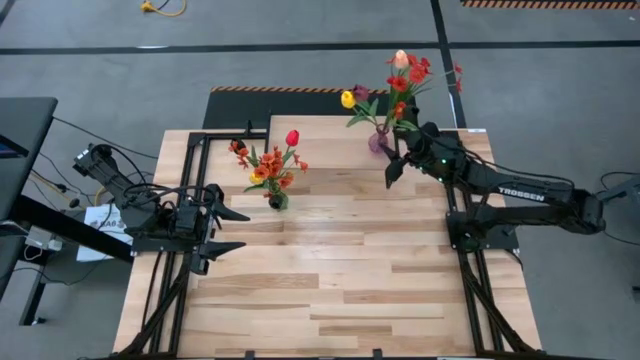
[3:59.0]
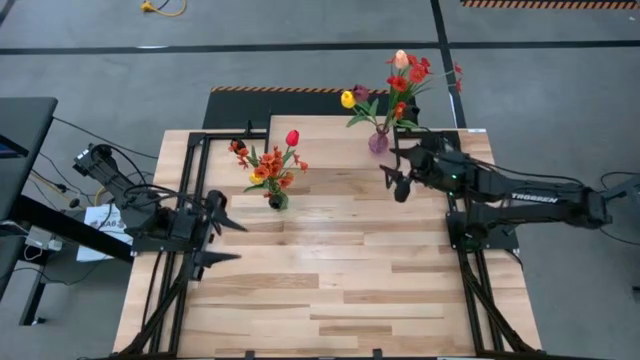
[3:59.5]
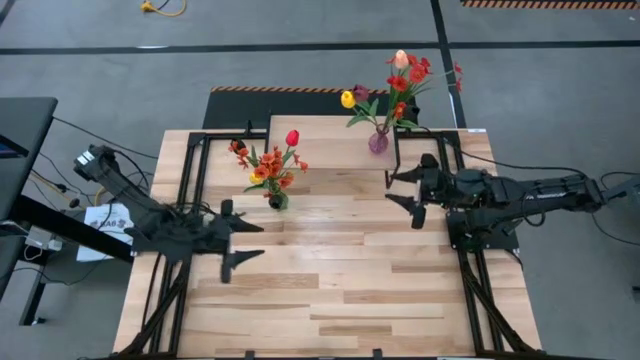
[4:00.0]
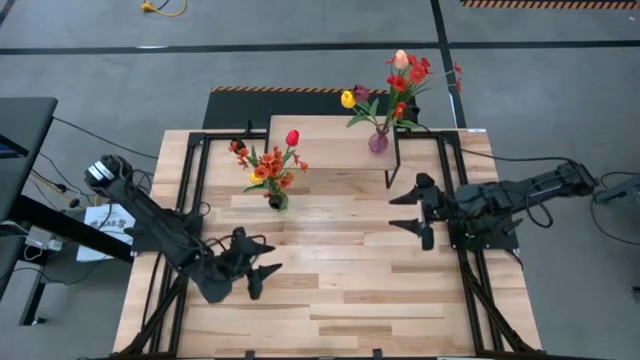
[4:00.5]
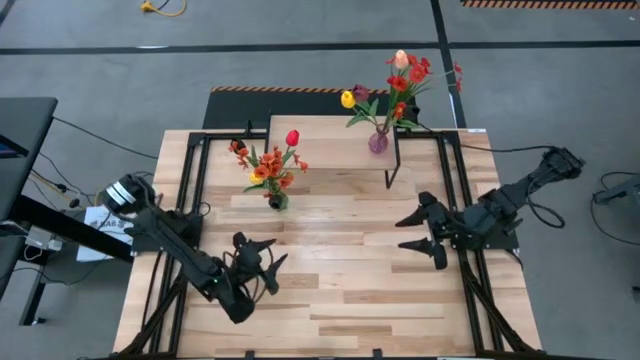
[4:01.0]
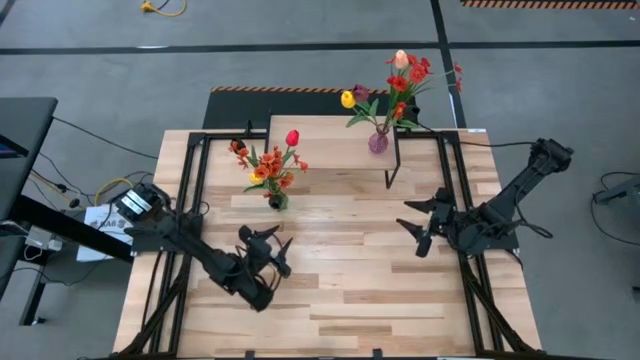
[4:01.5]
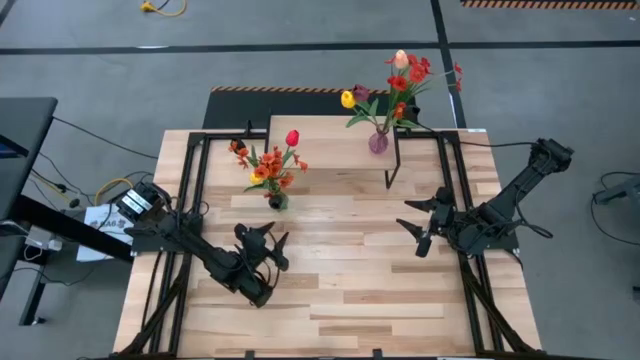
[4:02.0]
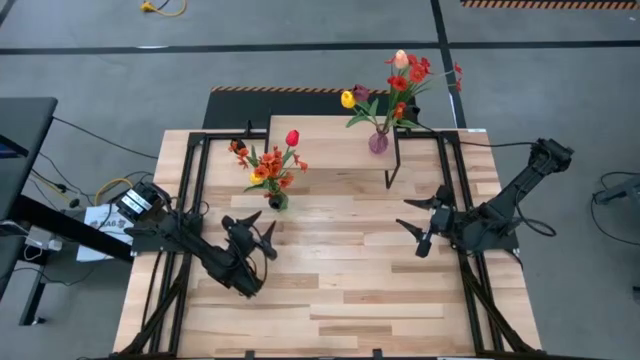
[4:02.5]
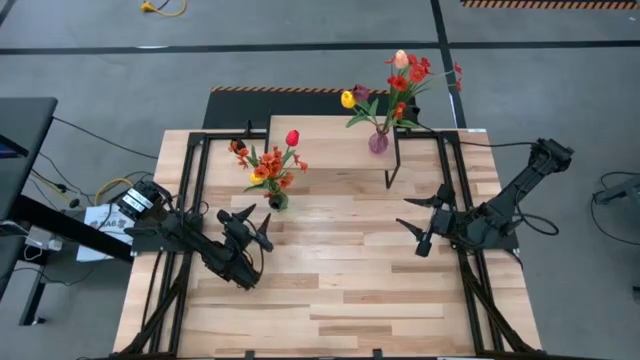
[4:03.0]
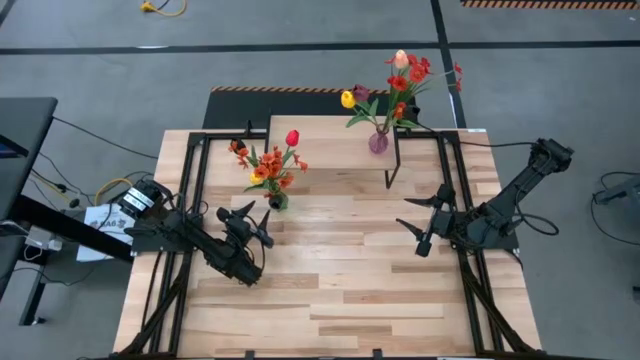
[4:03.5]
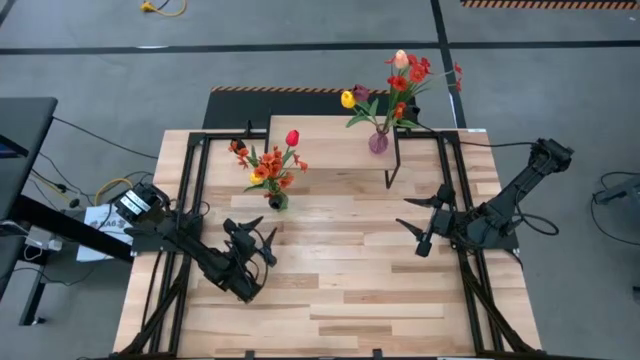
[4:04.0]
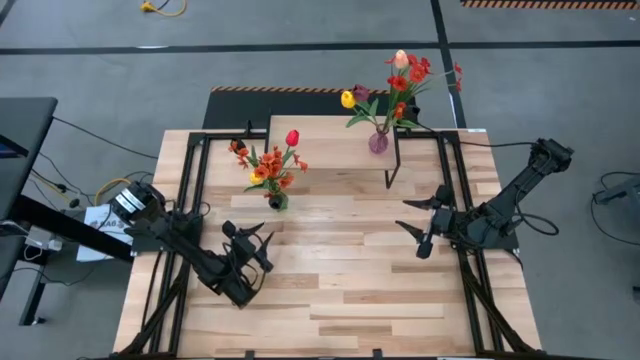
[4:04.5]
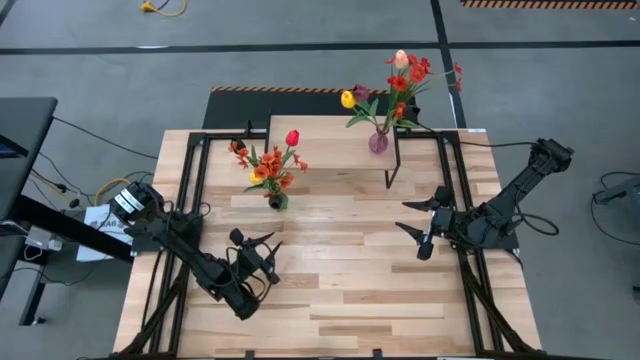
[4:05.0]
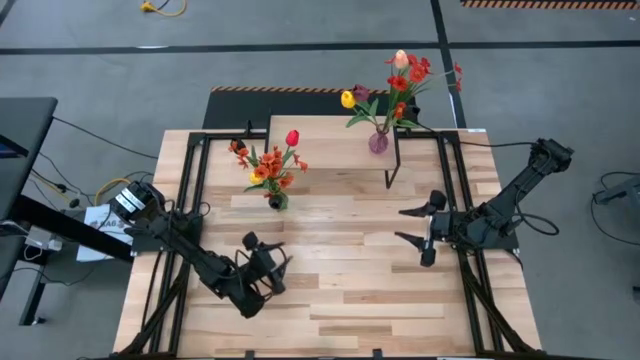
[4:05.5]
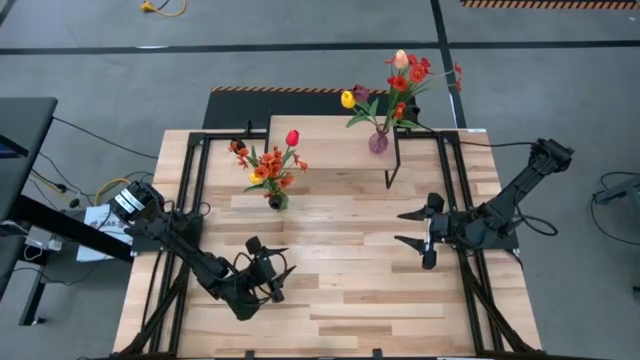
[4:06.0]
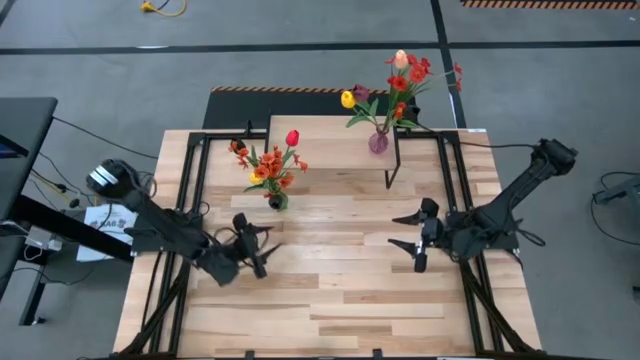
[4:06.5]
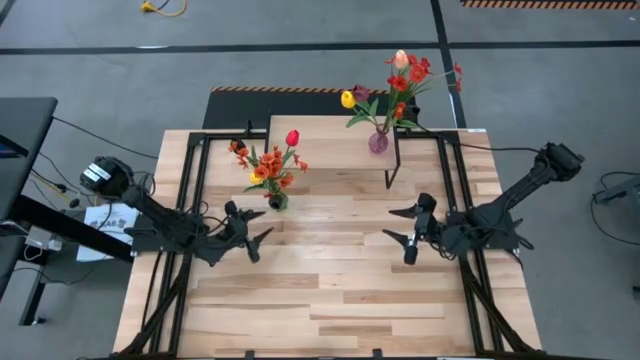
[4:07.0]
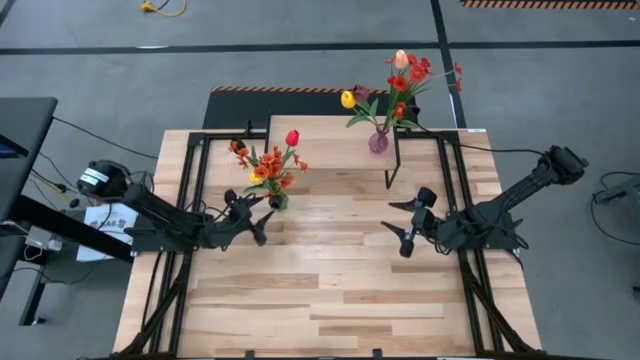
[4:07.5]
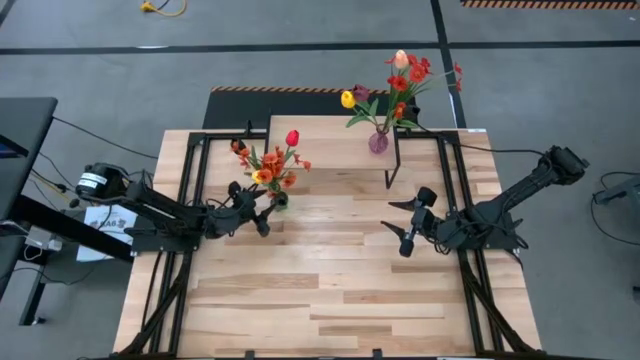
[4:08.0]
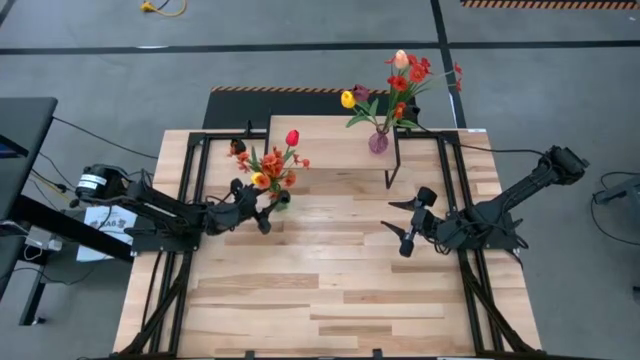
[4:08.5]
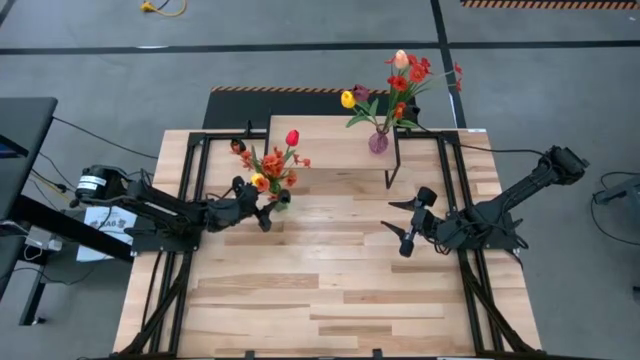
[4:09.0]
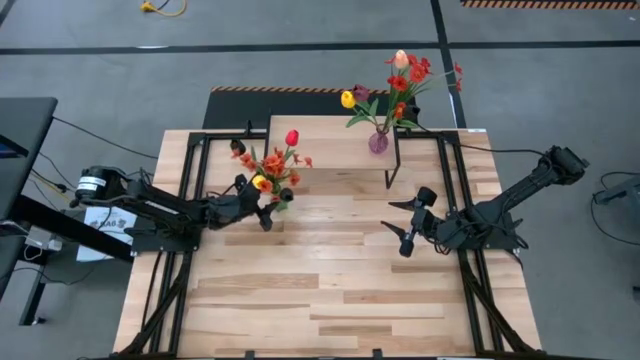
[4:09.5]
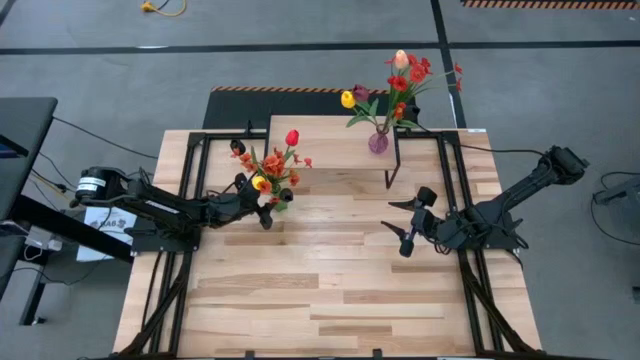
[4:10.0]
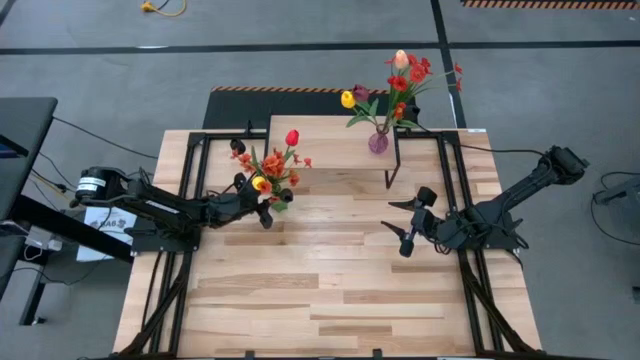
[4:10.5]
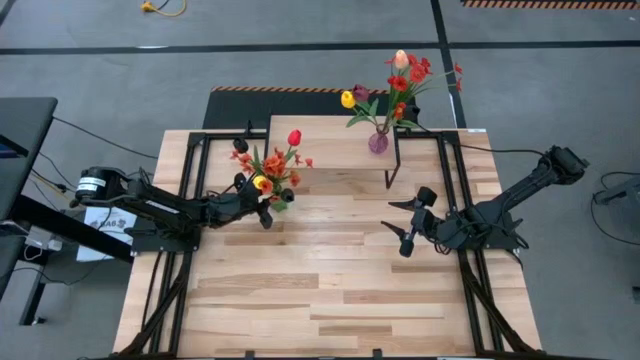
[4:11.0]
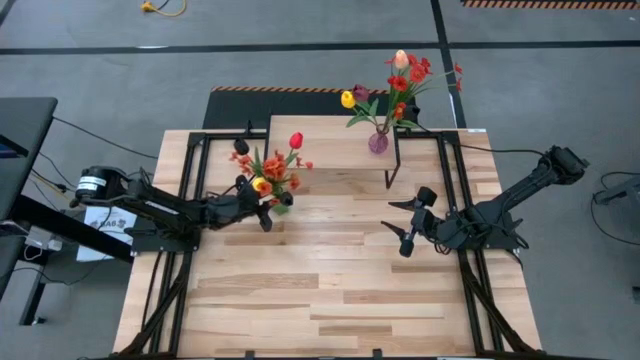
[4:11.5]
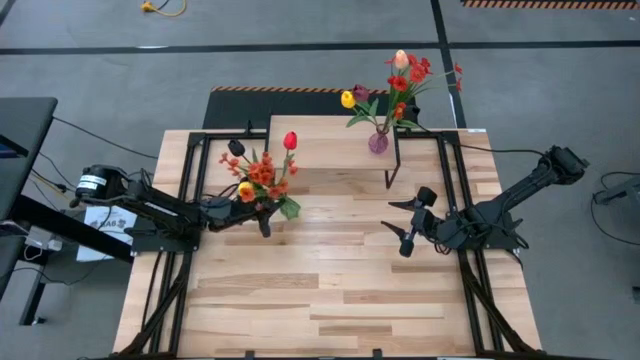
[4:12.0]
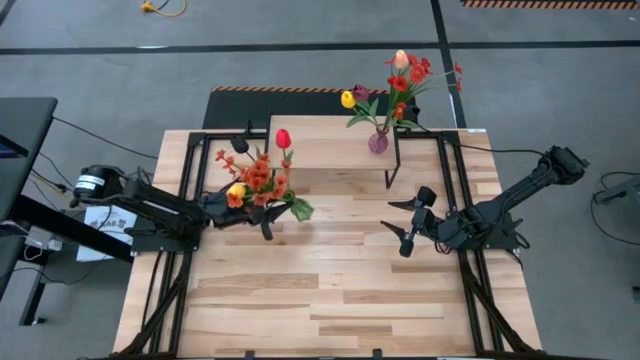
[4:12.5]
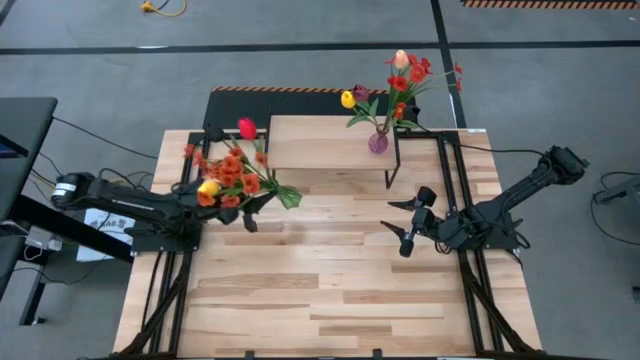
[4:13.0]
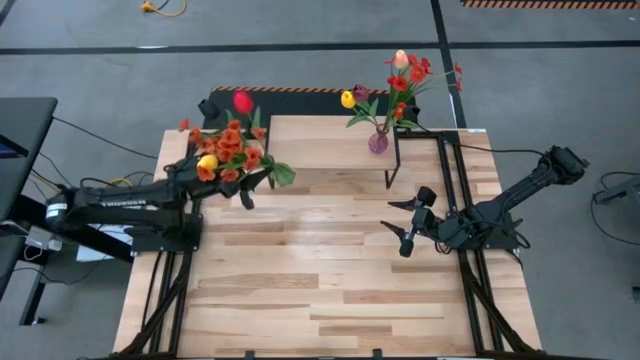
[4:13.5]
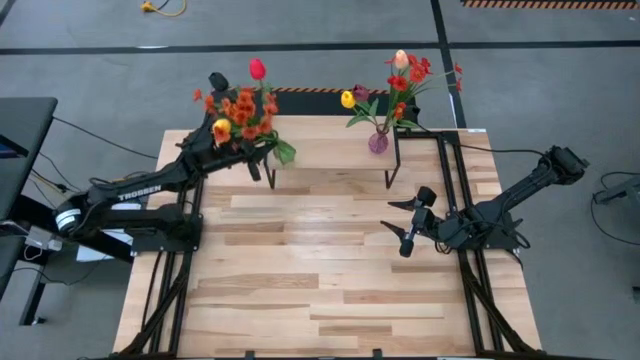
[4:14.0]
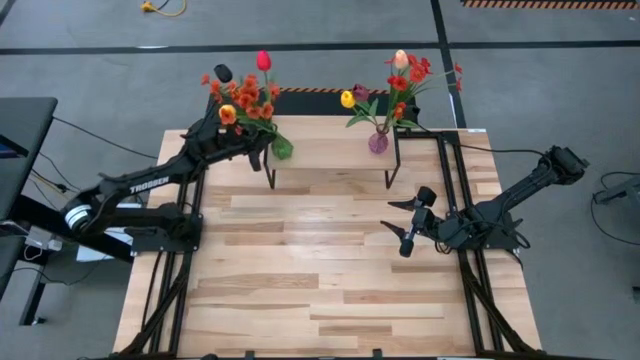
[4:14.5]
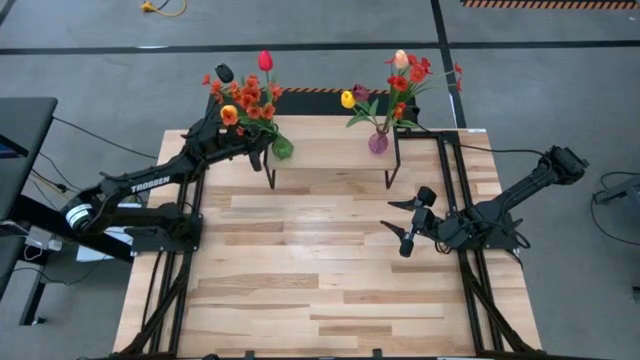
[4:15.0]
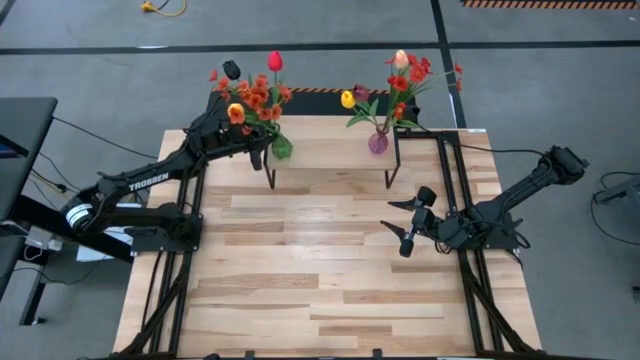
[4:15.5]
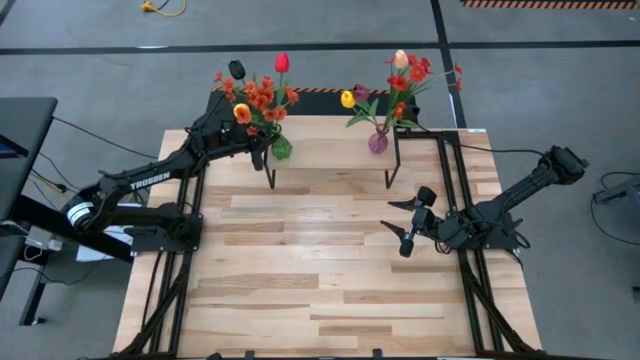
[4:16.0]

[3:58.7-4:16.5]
Task: Pick and place flowers into a vace then onto a shelf
Put the green vase on the shelf
